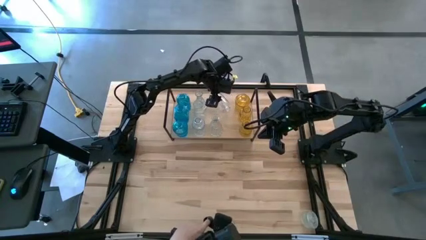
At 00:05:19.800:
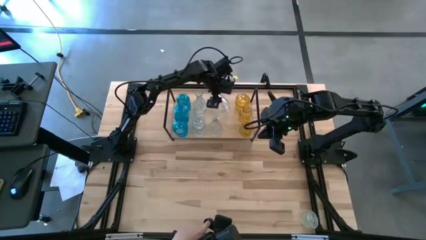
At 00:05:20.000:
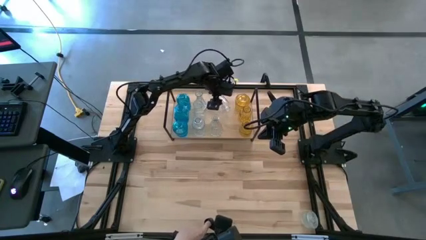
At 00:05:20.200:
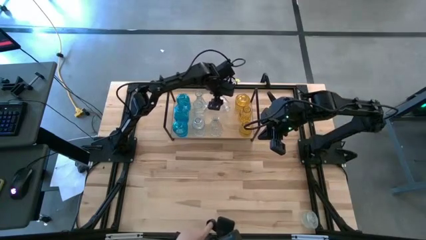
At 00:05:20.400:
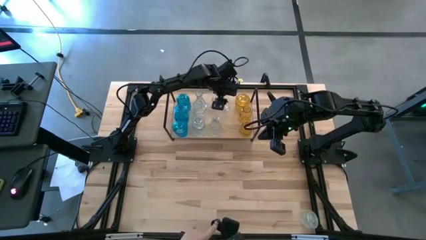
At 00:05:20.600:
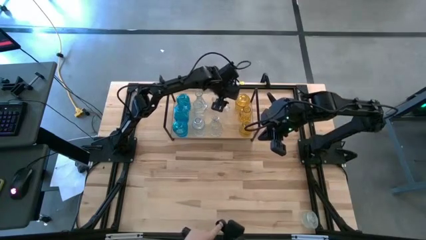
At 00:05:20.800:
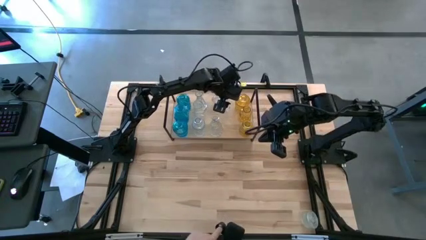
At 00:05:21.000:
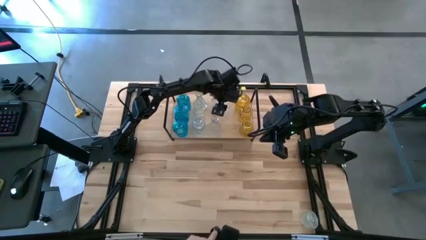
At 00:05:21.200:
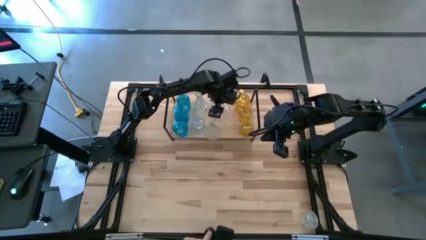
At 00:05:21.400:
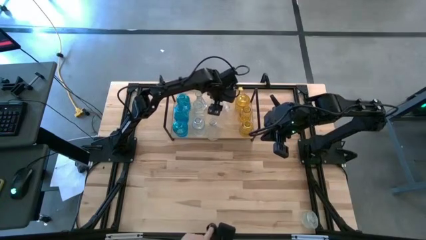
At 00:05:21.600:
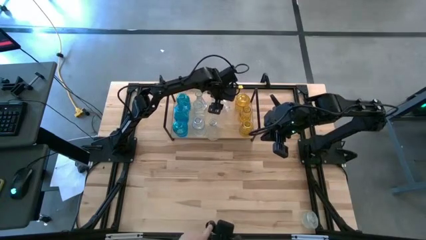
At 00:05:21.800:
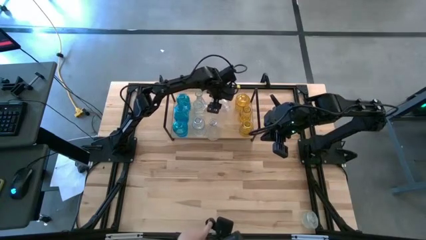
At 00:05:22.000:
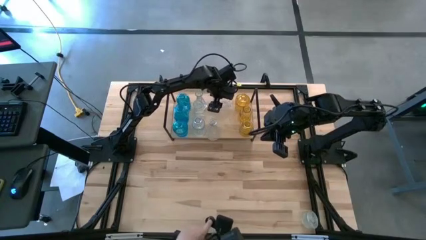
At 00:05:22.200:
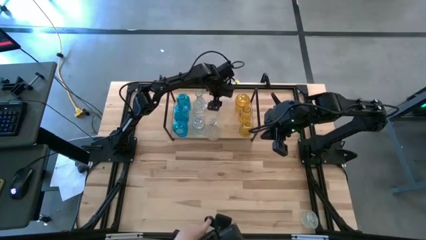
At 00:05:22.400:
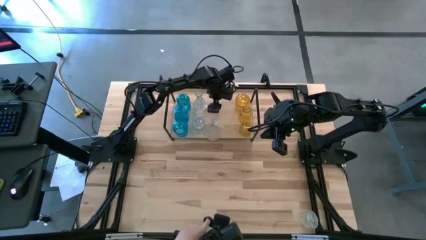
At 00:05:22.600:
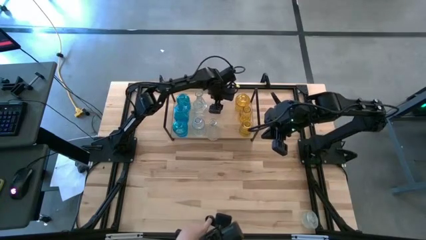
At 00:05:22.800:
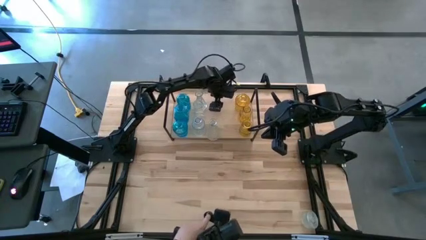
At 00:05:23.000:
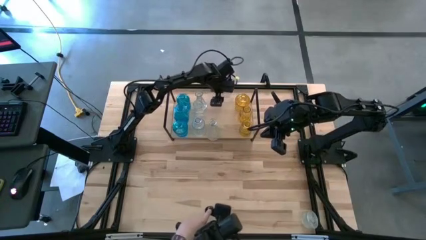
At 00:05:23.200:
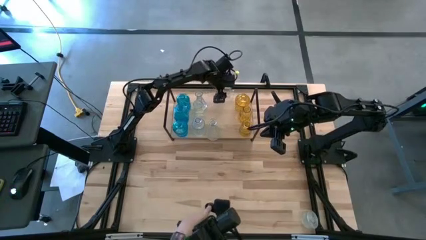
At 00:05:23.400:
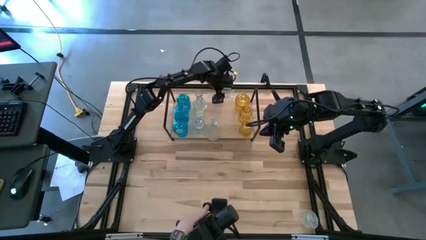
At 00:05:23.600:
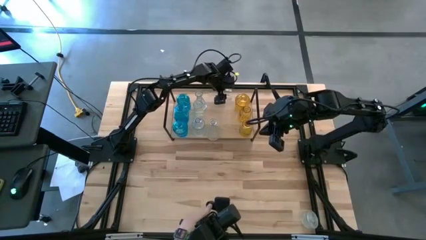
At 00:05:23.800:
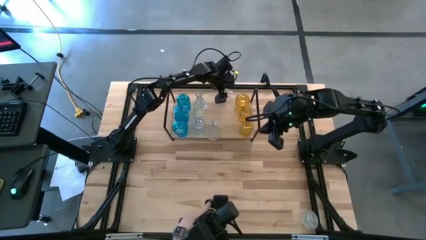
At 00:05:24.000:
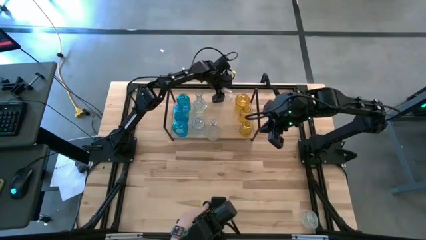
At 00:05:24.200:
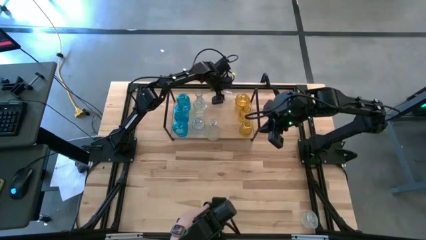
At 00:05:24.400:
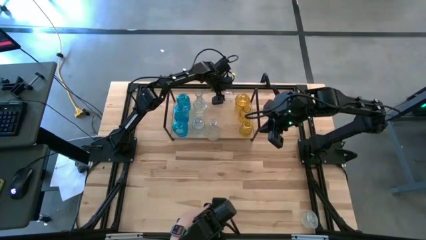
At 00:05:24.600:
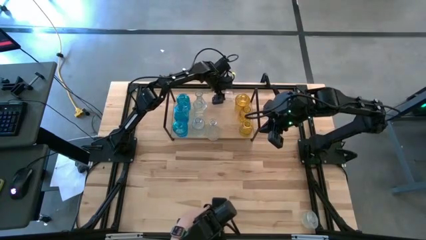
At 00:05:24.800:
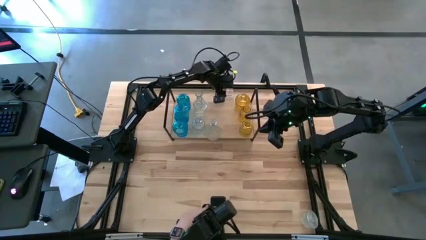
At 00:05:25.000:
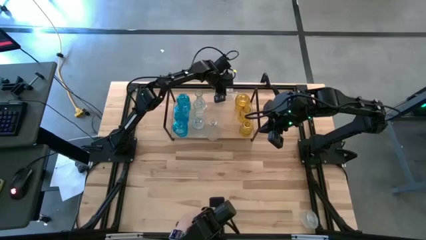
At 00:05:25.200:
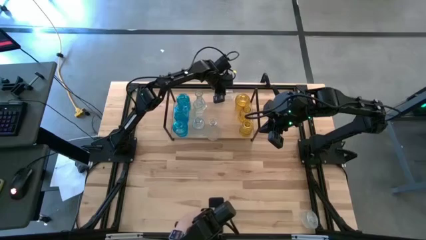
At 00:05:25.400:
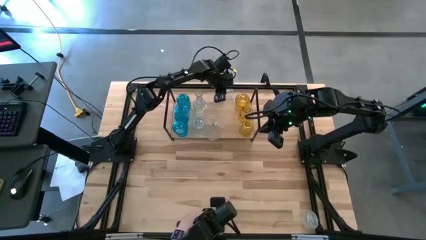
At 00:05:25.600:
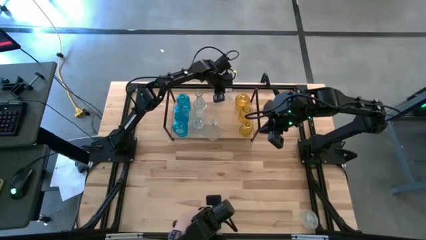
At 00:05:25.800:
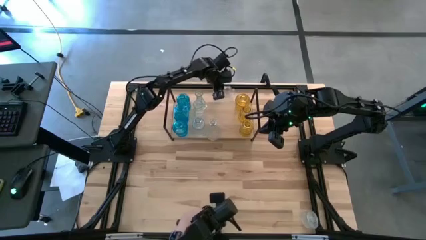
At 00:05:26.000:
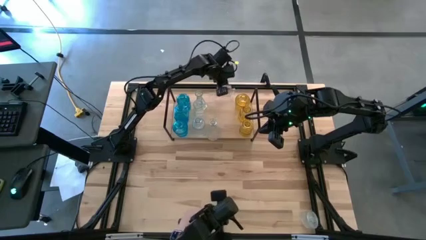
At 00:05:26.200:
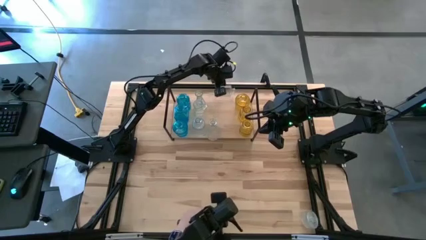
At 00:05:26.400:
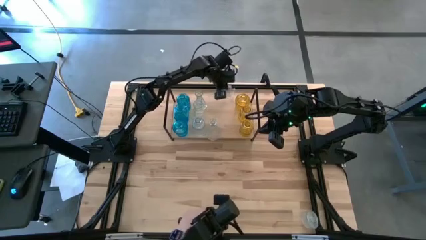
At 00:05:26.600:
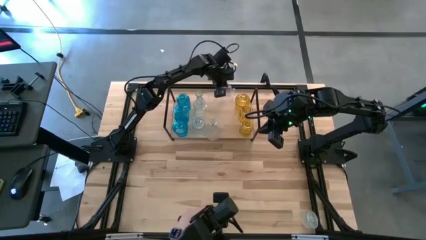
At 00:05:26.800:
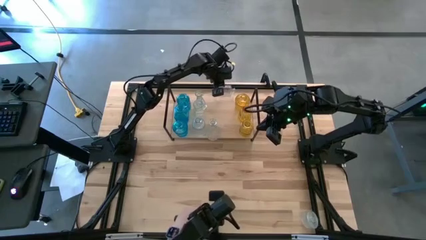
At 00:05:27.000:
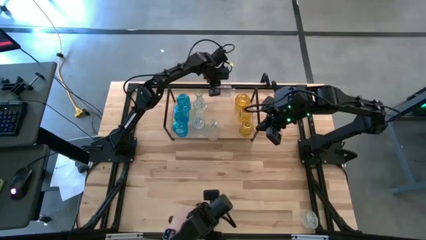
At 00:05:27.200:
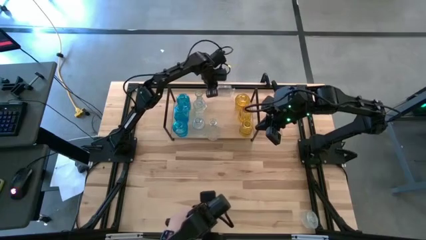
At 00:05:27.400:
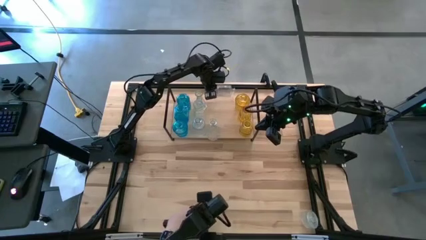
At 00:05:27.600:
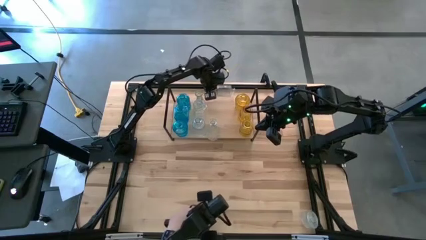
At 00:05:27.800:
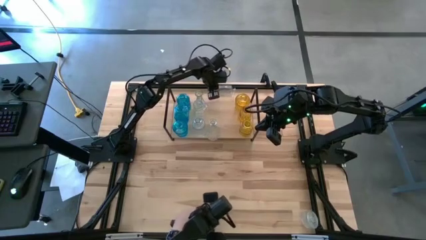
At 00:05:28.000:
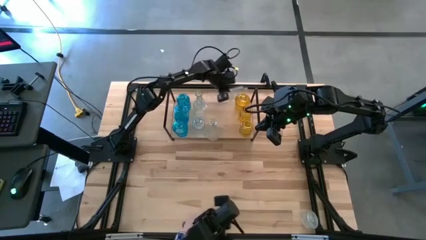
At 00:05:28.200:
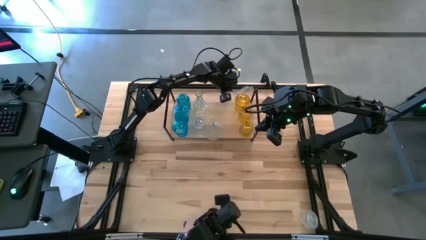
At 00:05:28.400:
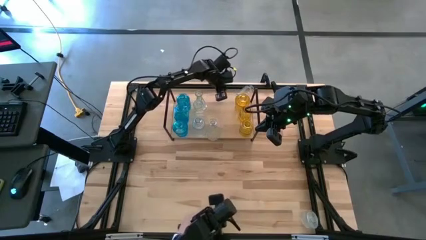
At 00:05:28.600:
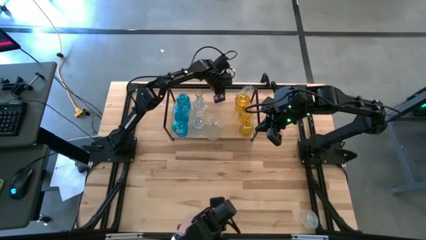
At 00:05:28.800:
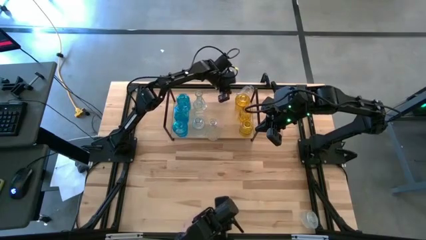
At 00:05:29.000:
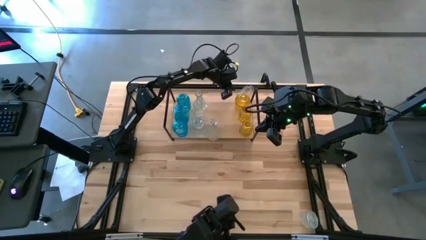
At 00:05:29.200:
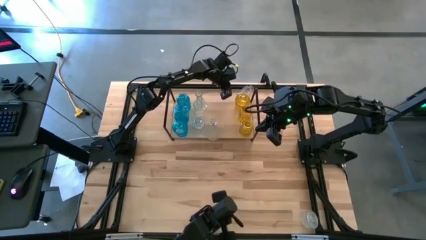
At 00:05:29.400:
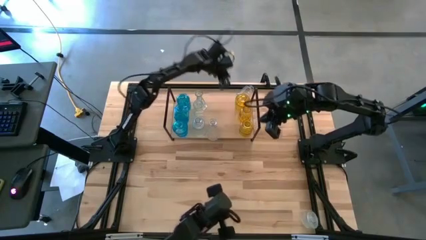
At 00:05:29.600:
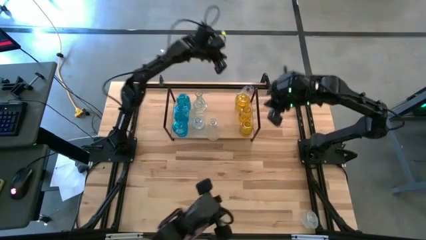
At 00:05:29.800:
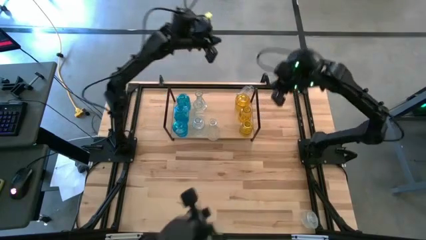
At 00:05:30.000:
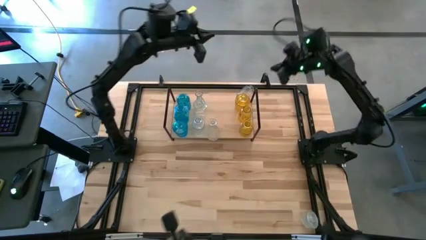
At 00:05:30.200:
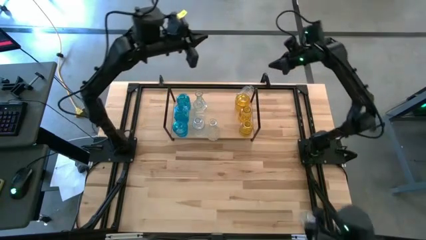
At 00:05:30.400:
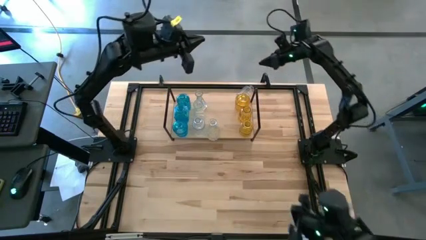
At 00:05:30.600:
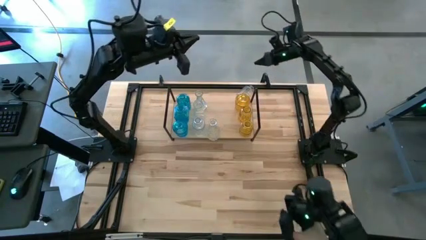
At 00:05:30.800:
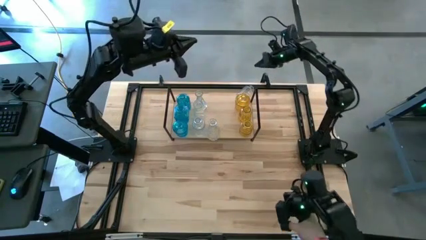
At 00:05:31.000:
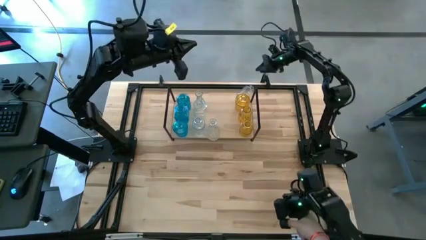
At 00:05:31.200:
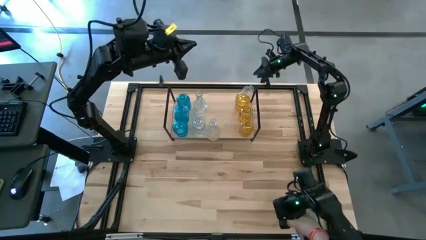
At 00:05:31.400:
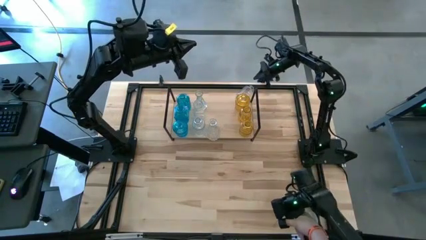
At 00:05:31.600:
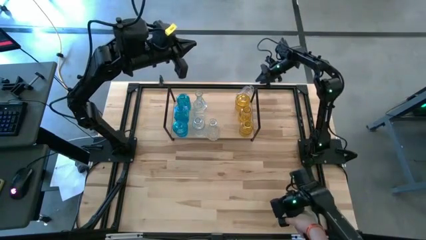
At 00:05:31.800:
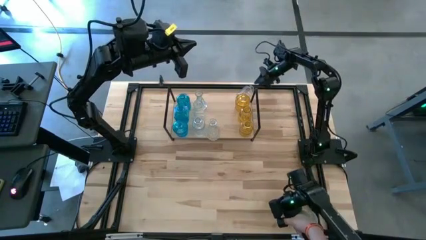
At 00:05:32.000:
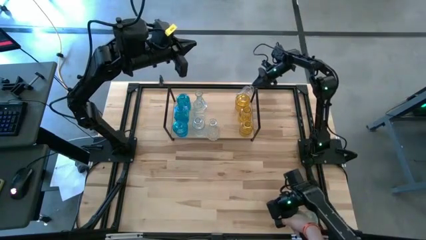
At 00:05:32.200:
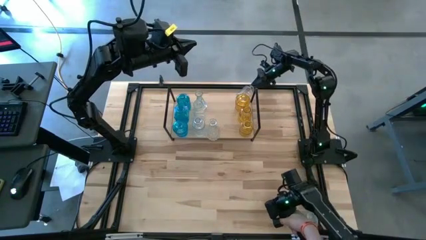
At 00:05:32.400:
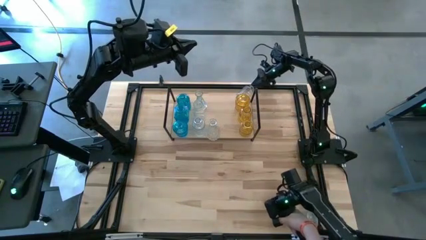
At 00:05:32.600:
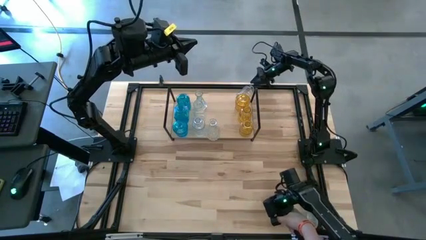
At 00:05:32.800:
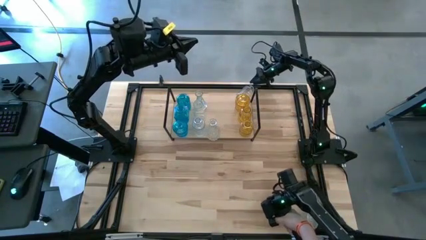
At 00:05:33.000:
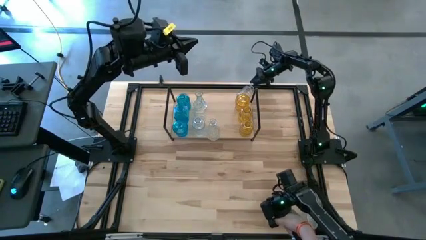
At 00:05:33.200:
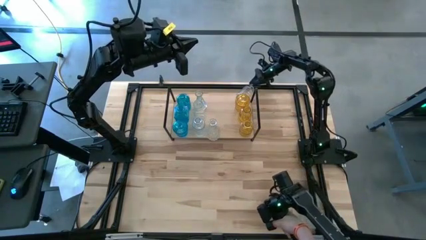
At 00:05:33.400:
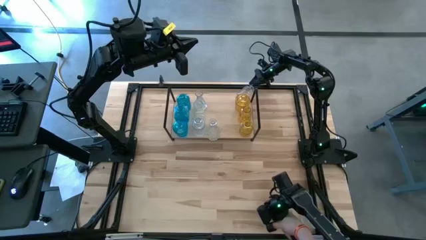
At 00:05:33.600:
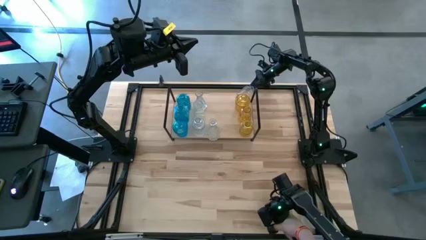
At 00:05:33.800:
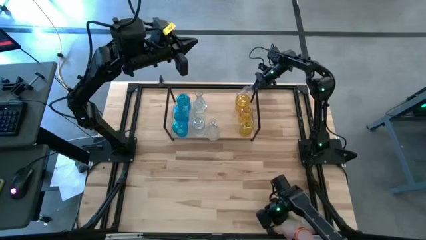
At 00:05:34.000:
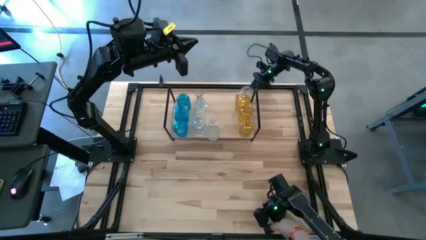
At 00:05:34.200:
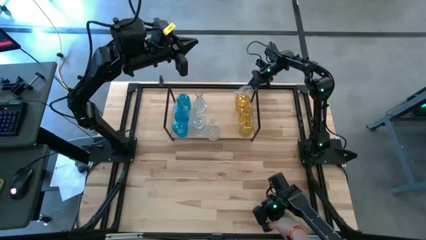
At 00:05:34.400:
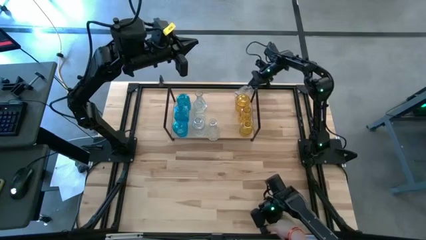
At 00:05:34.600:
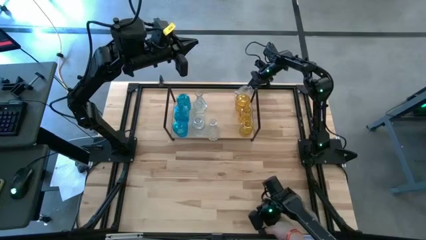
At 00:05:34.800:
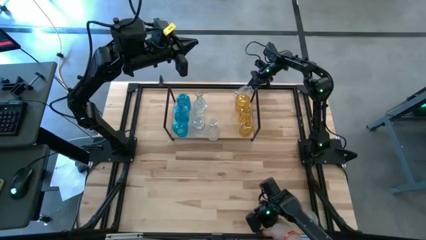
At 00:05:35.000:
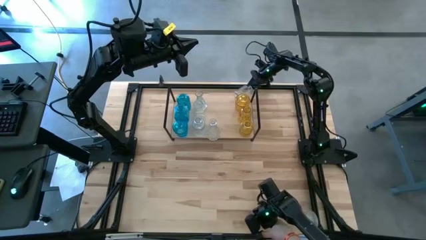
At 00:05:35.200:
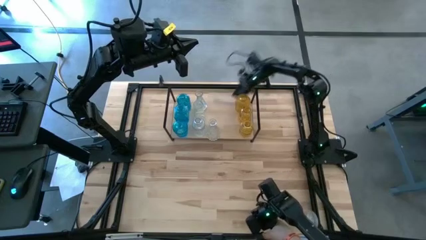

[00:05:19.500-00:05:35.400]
Task: sort vases onto shelf
Put the transparent vase on the shelf aligned with the other transparent vase
